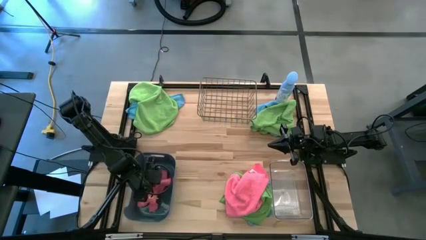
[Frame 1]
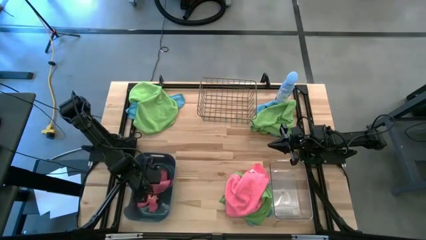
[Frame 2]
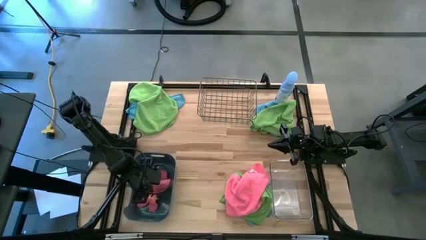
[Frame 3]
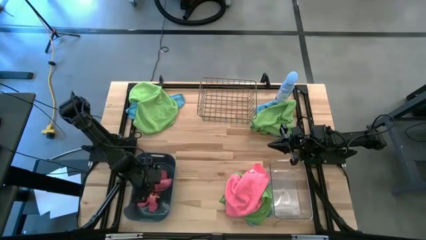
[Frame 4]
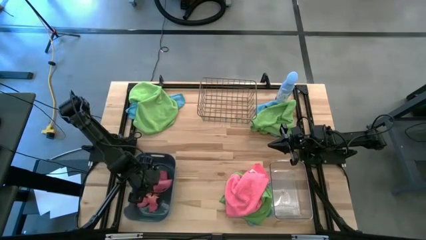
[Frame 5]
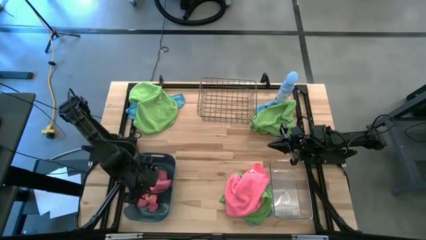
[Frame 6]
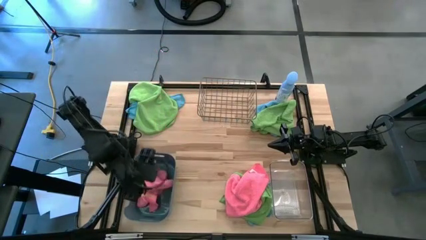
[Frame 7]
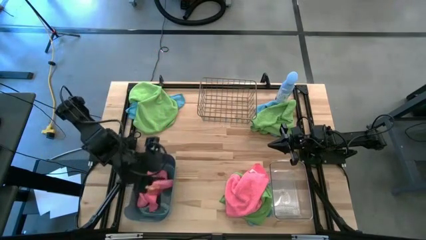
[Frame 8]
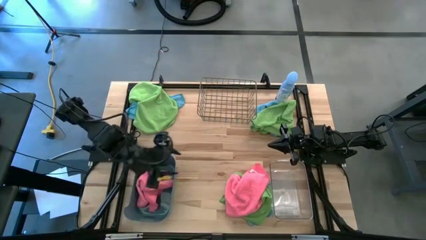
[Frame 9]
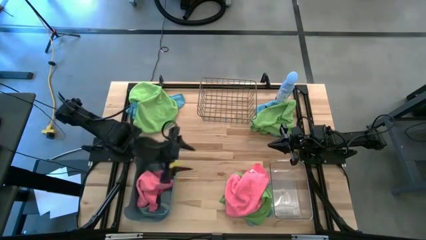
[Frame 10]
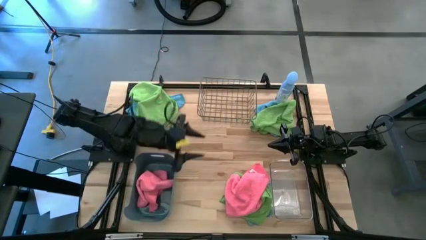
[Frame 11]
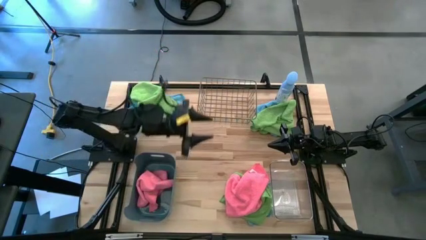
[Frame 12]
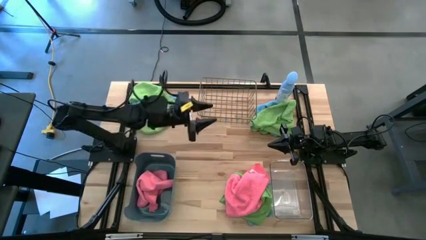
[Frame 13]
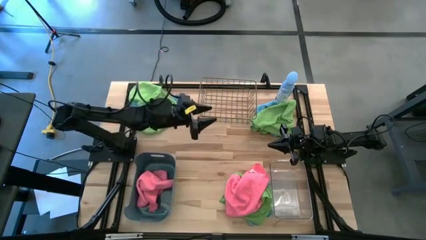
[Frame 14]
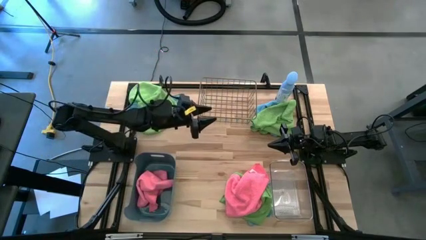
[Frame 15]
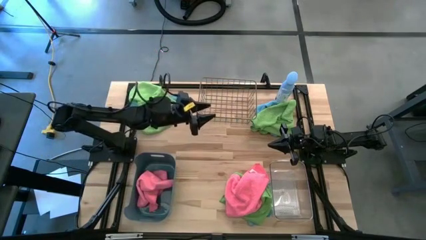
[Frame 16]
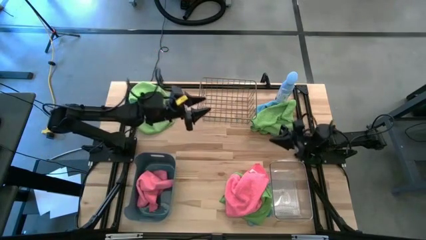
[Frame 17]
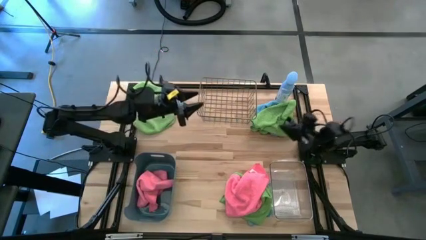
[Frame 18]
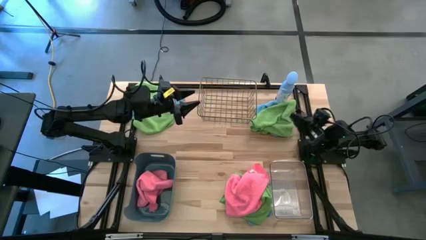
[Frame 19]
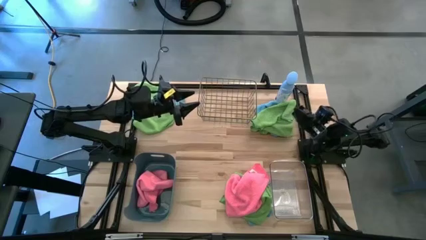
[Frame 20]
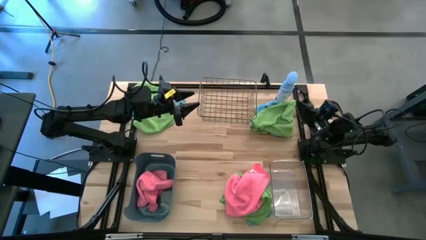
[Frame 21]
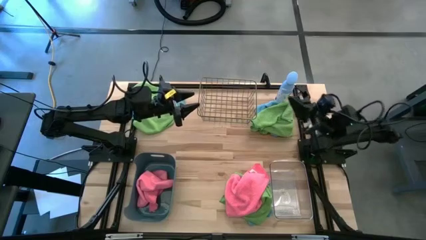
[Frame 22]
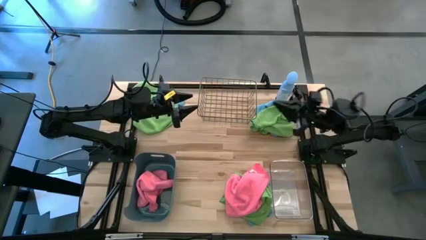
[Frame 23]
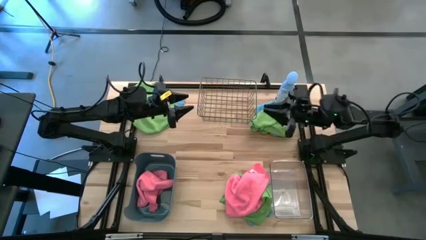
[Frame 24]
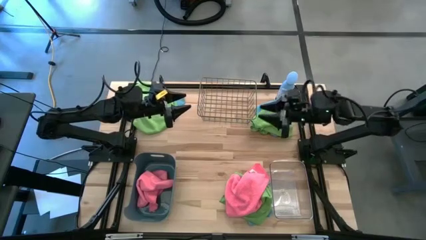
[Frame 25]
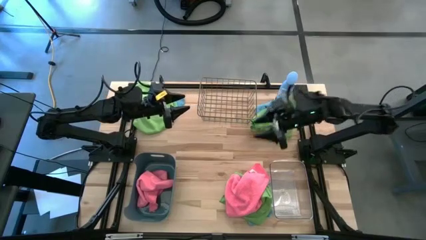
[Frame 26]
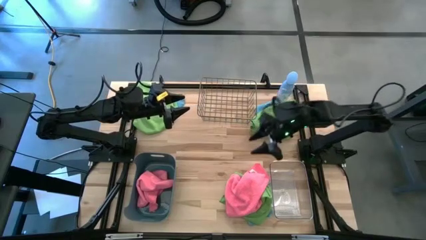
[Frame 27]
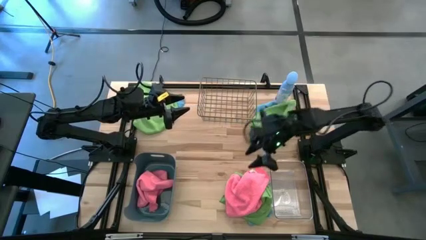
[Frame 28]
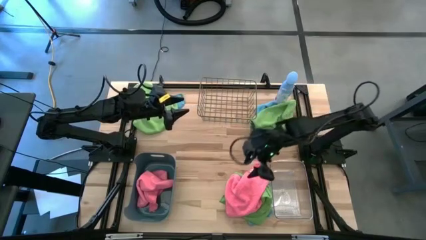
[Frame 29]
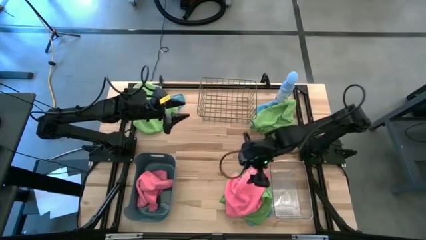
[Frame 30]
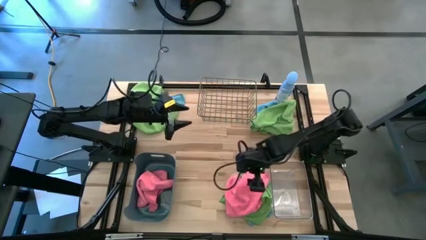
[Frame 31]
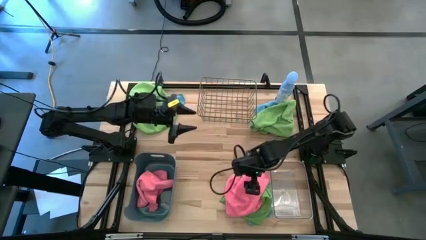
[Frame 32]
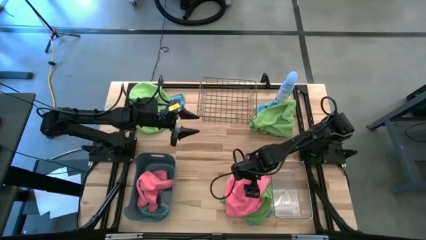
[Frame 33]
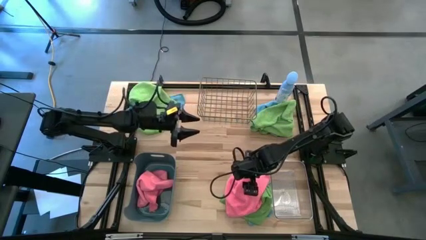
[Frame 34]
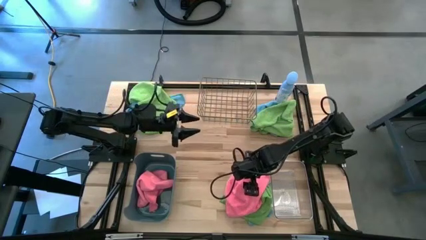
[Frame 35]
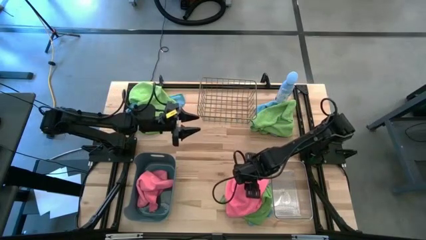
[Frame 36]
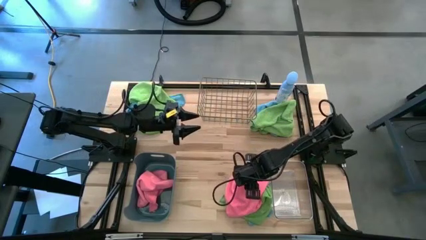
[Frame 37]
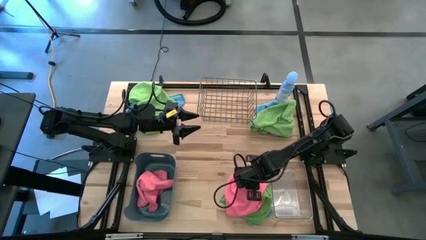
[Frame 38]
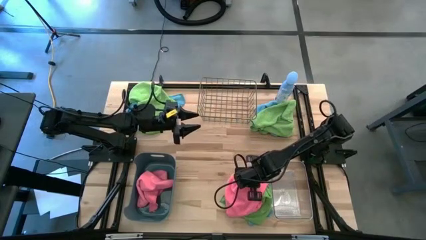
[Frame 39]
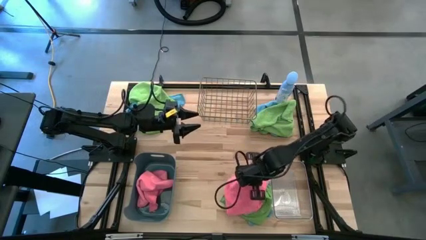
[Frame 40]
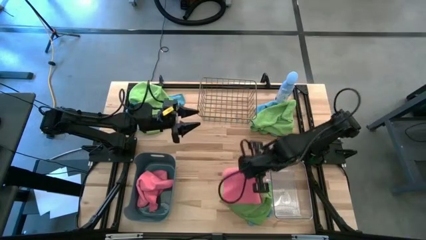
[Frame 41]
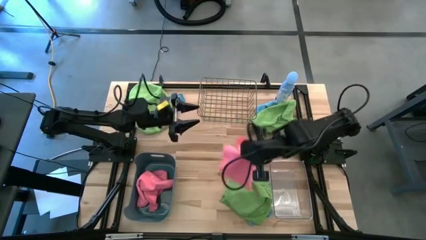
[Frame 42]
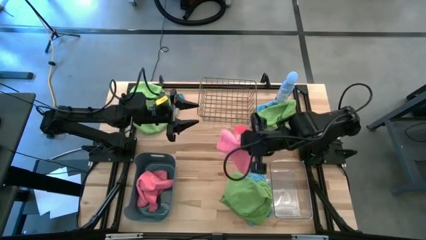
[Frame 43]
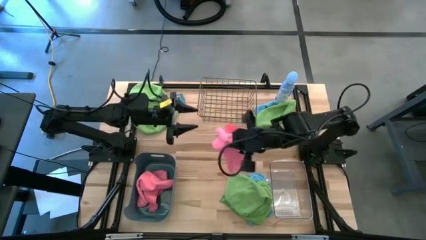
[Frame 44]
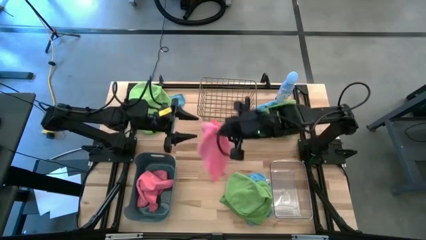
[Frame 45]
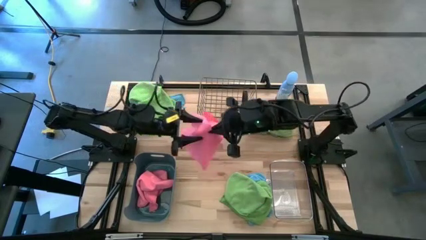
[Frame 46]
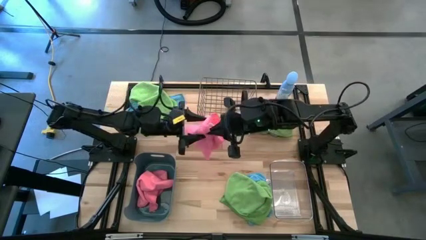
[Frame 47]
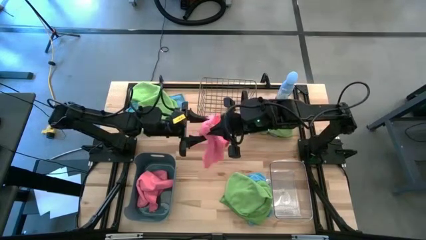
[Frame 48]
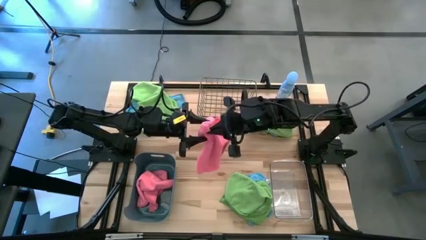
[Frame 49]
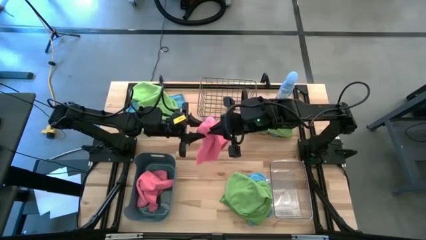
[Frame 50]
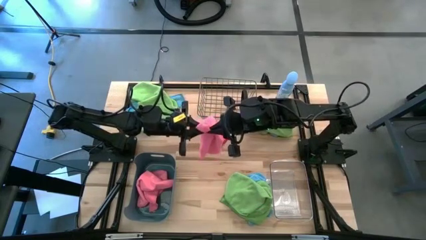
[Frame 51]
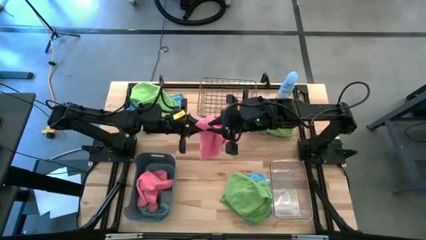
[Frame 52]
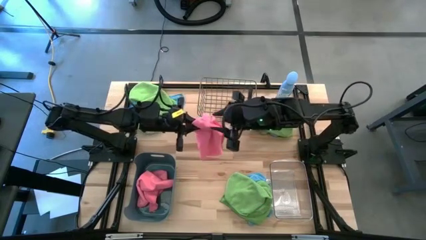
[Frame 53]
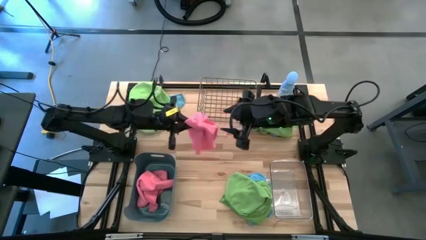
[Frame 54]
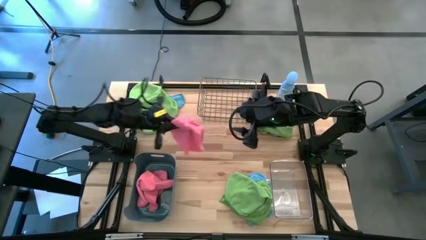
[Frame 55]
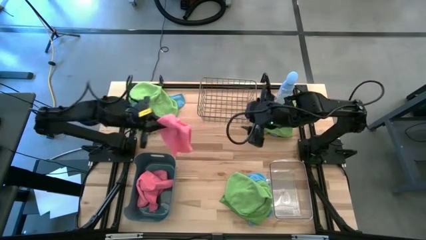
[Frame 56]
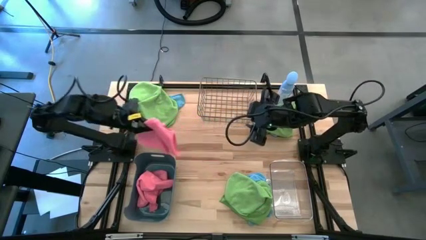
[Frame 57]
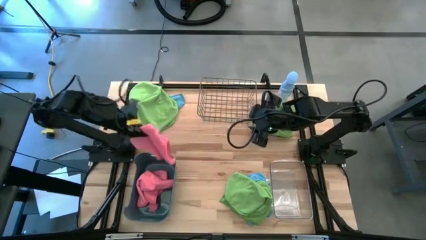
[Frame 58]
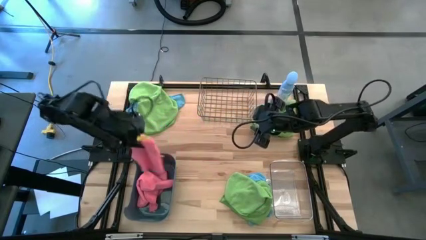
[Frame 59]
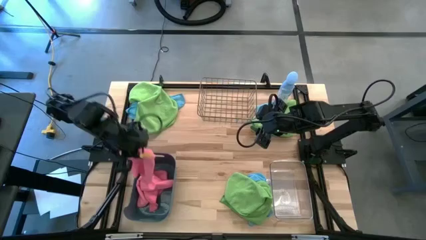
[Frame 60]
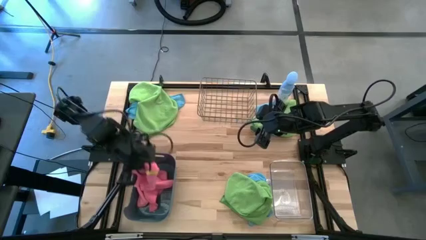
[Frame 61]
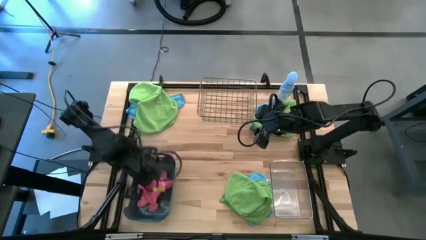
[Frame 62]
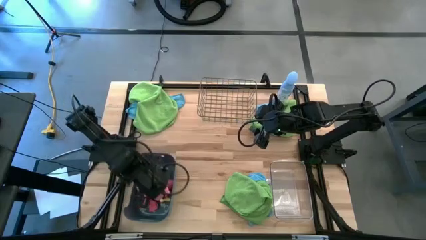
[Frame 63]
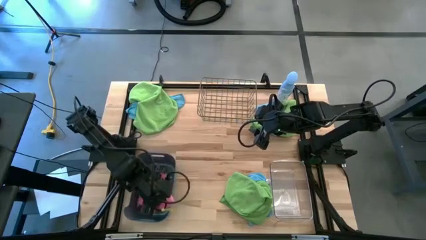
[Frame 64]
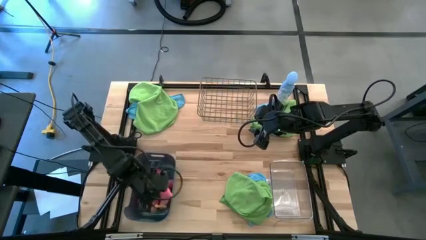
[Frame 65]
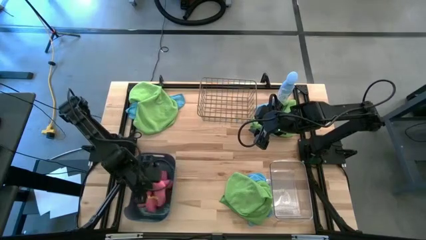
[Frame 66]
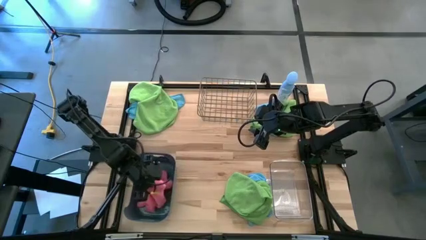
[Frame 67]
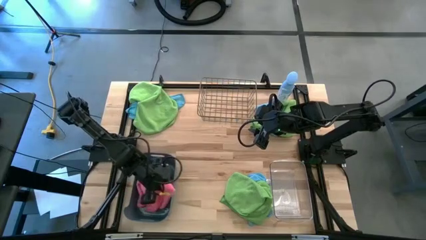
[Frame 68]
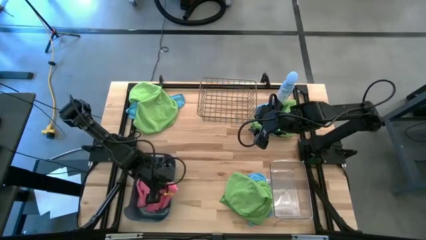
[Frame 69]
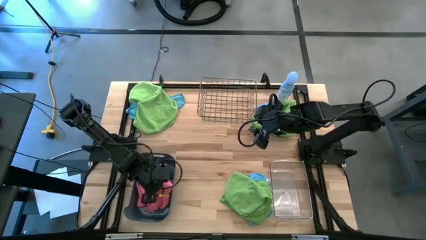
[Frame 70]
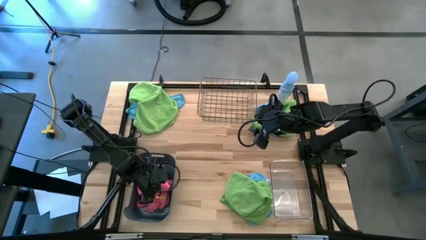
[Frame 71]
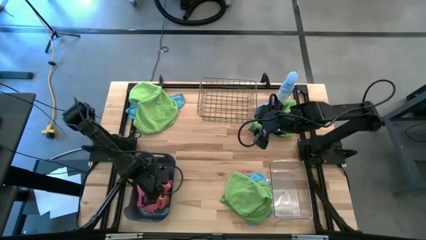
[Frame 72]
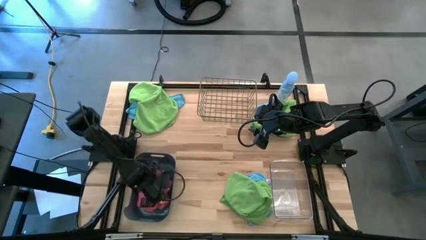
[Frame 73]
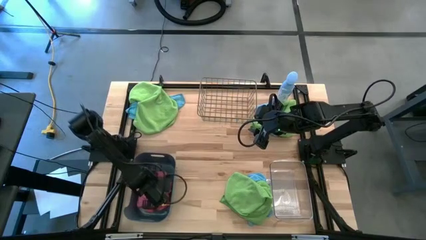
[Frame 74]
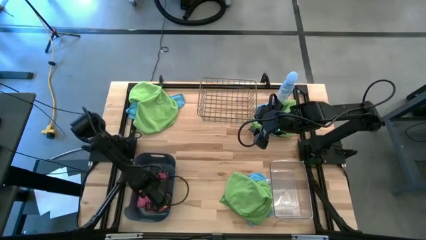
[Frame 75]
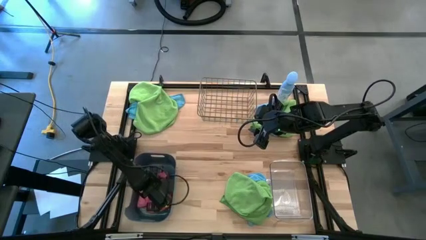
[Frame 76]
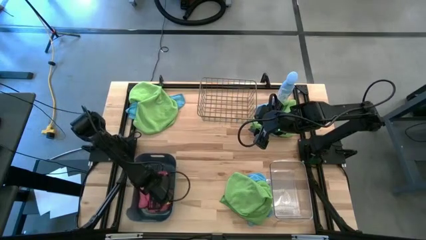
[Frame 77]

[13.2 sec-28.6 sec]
Task: Sort microfiber towel by color & place in baskets
Put the pink towel into the blue bin
